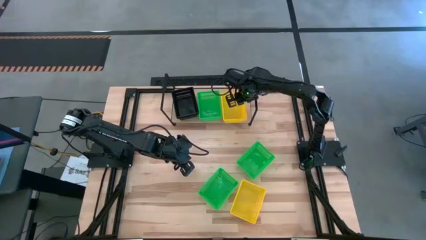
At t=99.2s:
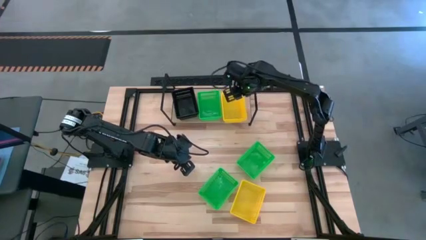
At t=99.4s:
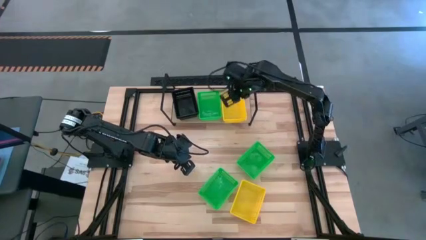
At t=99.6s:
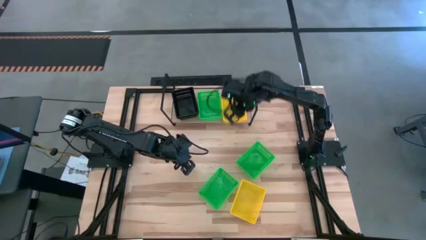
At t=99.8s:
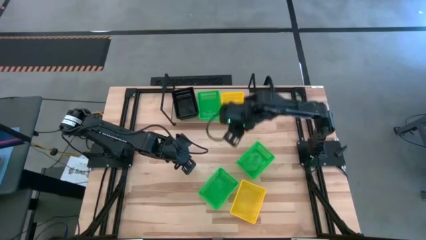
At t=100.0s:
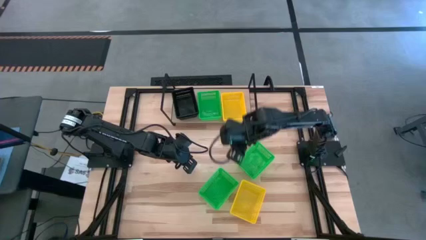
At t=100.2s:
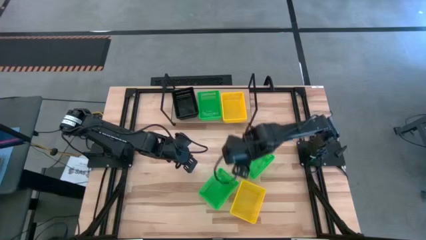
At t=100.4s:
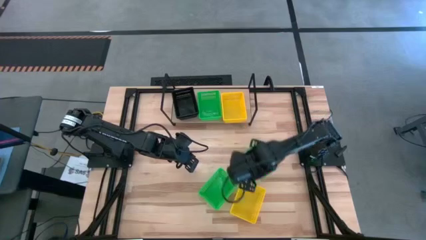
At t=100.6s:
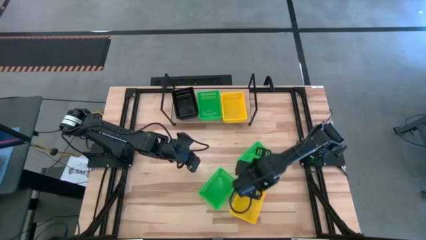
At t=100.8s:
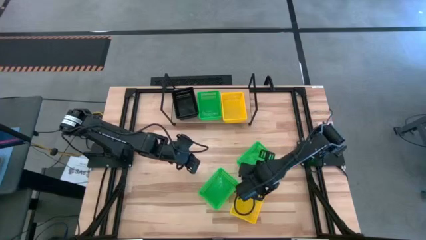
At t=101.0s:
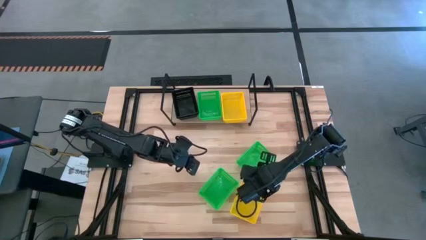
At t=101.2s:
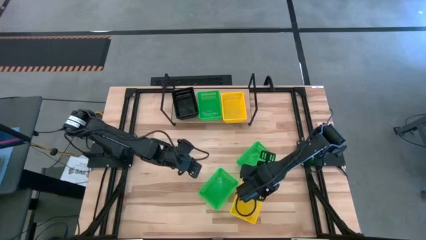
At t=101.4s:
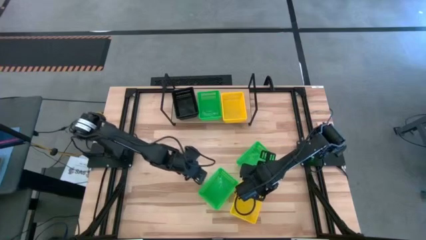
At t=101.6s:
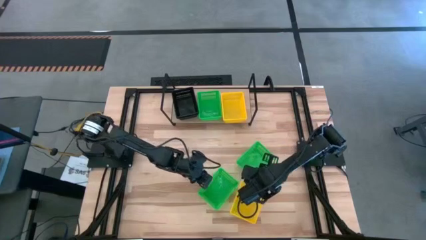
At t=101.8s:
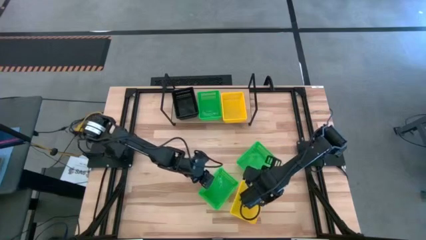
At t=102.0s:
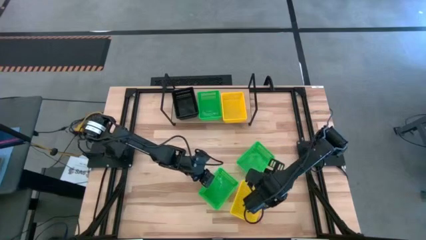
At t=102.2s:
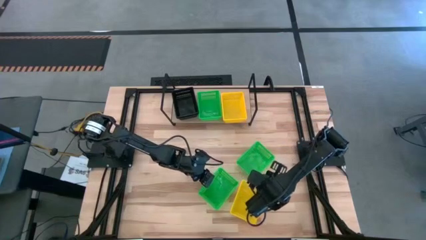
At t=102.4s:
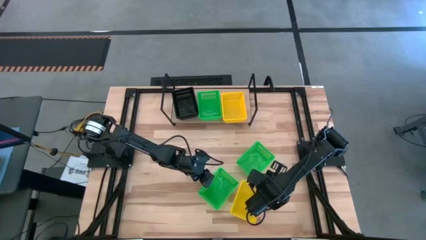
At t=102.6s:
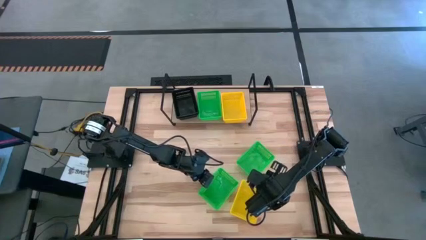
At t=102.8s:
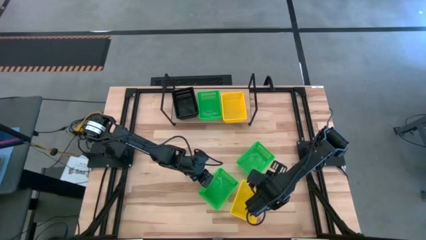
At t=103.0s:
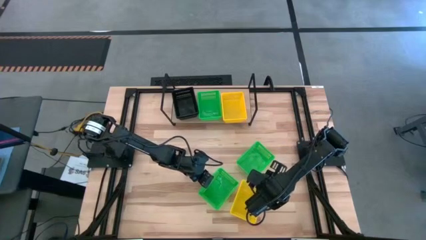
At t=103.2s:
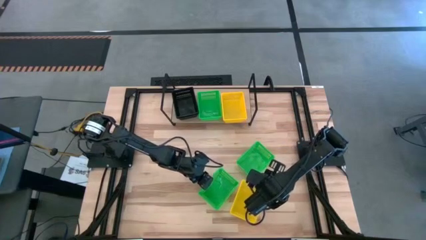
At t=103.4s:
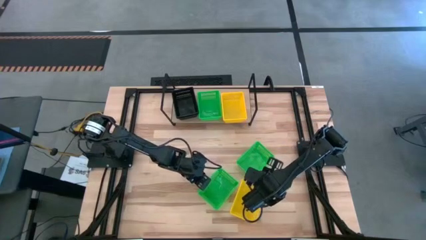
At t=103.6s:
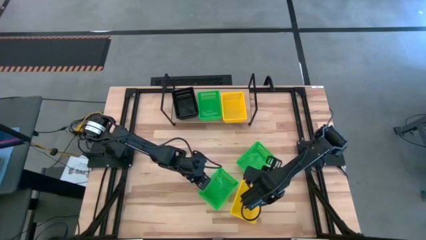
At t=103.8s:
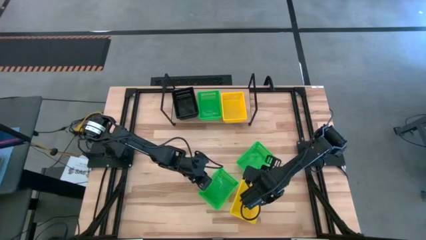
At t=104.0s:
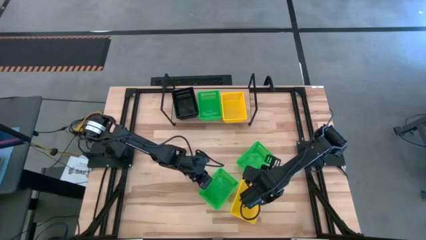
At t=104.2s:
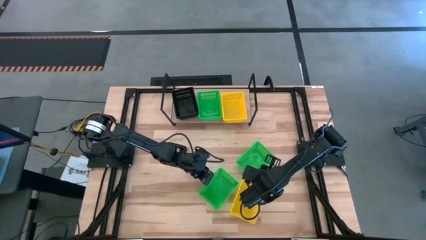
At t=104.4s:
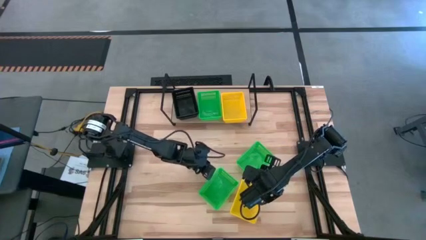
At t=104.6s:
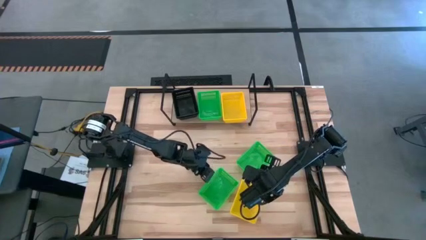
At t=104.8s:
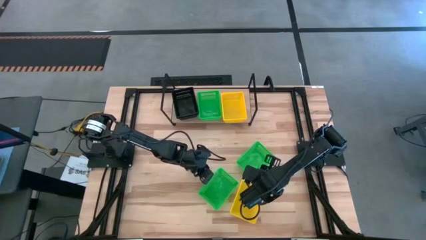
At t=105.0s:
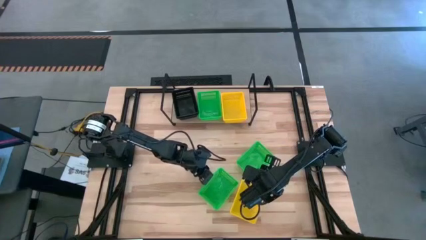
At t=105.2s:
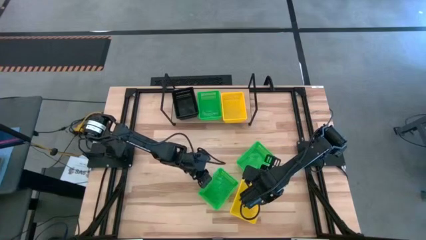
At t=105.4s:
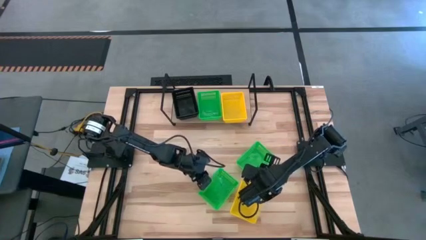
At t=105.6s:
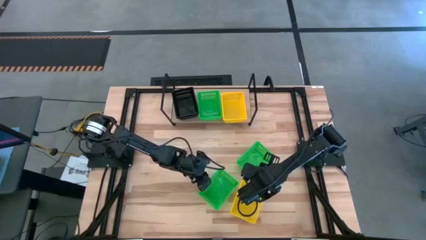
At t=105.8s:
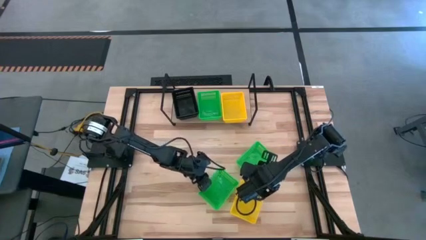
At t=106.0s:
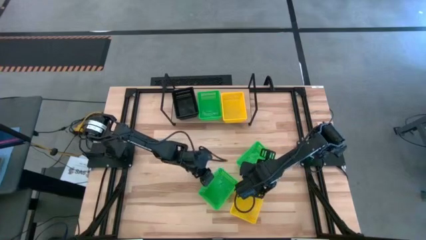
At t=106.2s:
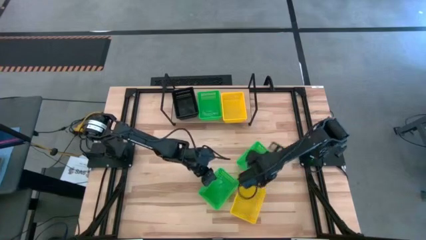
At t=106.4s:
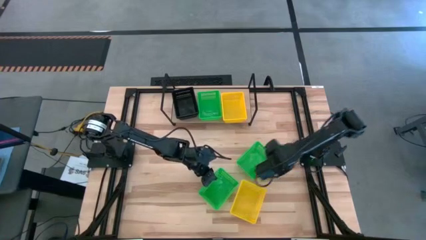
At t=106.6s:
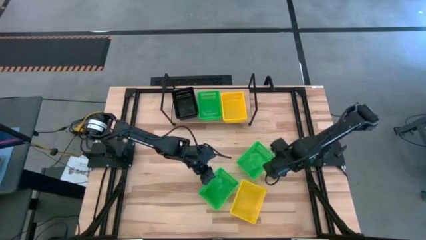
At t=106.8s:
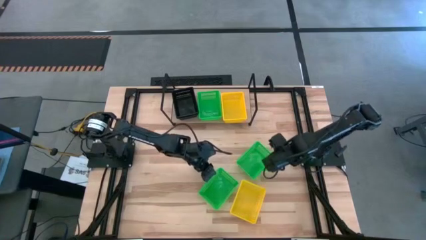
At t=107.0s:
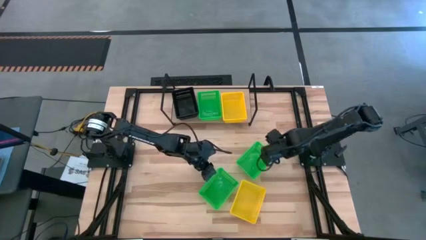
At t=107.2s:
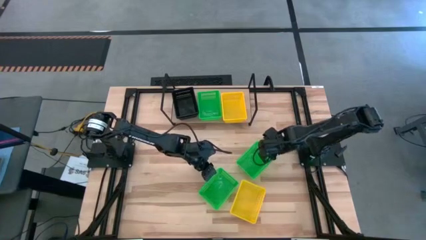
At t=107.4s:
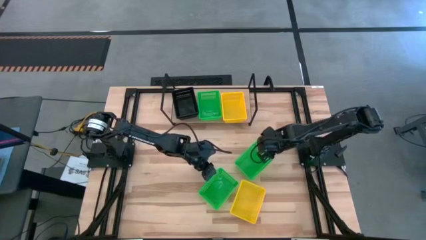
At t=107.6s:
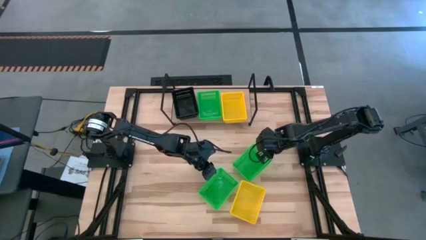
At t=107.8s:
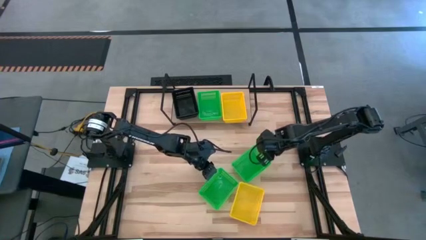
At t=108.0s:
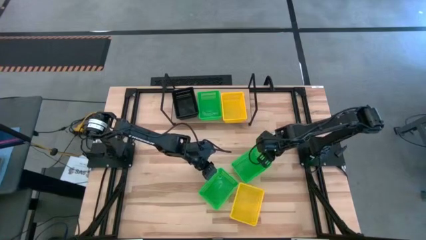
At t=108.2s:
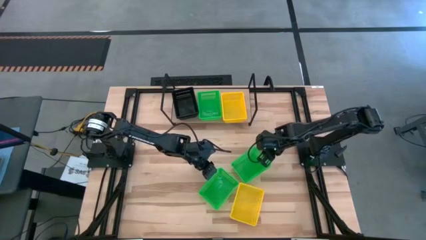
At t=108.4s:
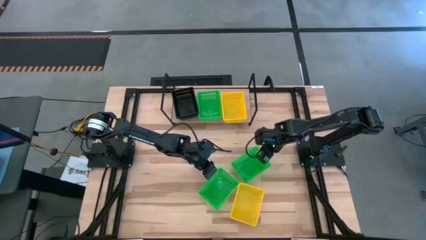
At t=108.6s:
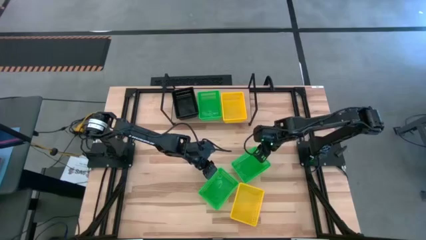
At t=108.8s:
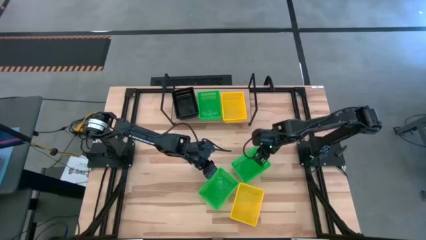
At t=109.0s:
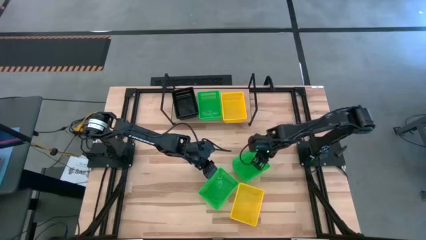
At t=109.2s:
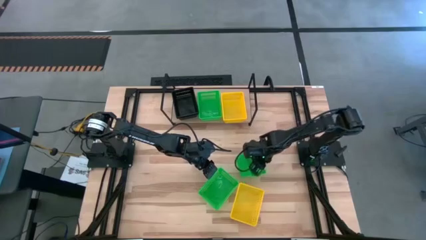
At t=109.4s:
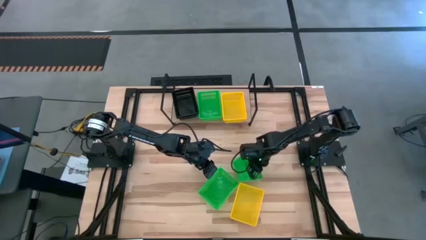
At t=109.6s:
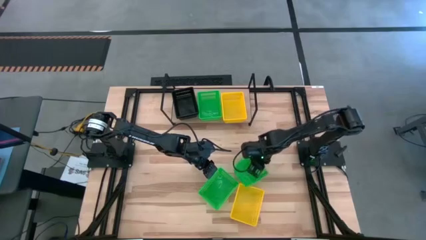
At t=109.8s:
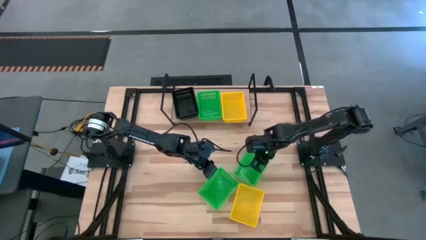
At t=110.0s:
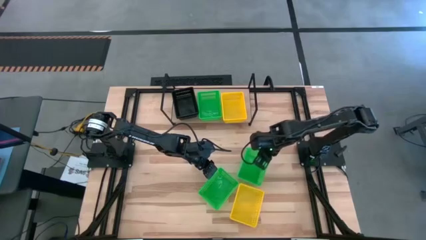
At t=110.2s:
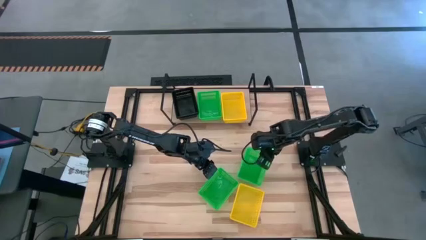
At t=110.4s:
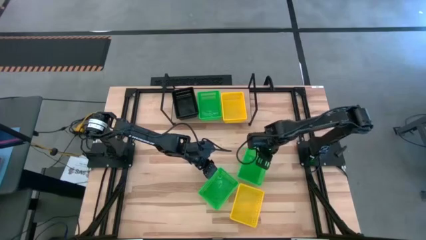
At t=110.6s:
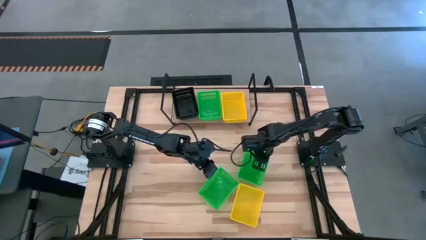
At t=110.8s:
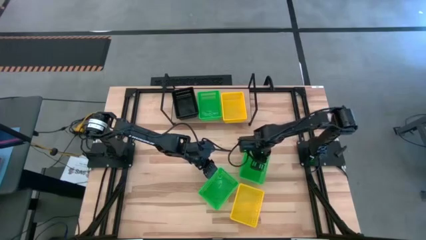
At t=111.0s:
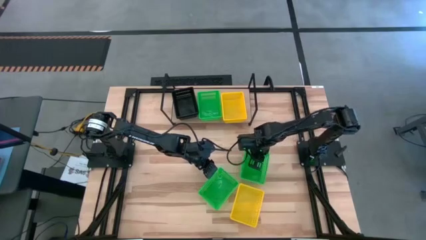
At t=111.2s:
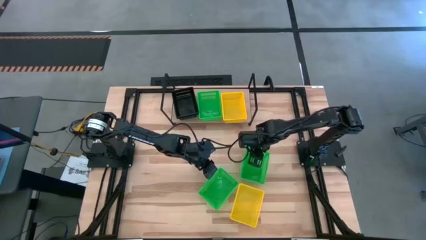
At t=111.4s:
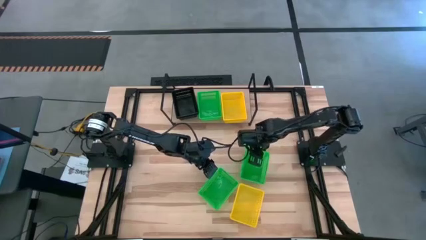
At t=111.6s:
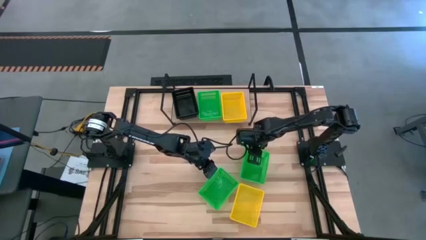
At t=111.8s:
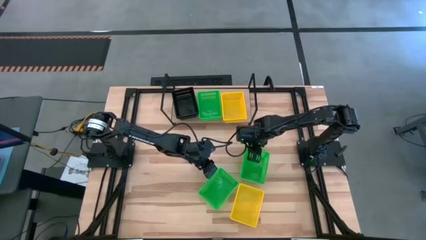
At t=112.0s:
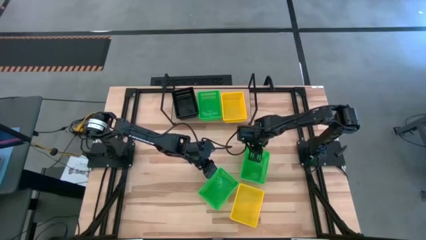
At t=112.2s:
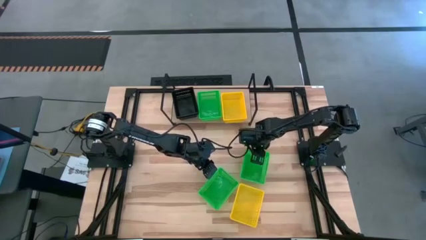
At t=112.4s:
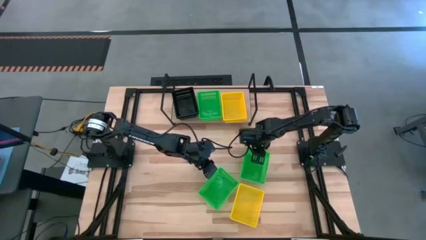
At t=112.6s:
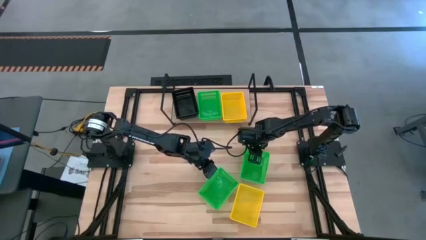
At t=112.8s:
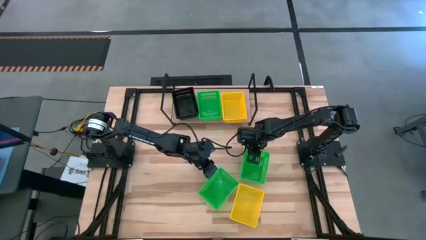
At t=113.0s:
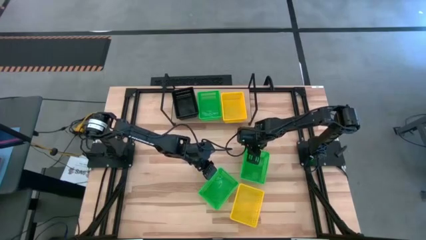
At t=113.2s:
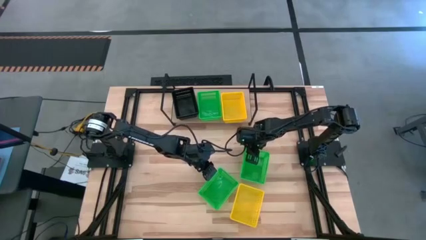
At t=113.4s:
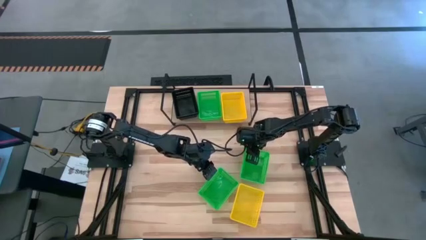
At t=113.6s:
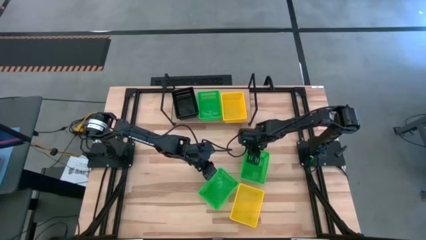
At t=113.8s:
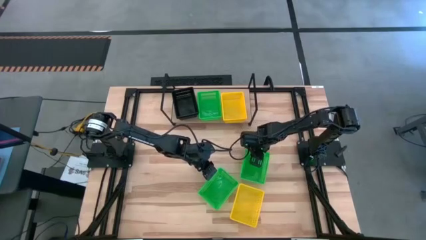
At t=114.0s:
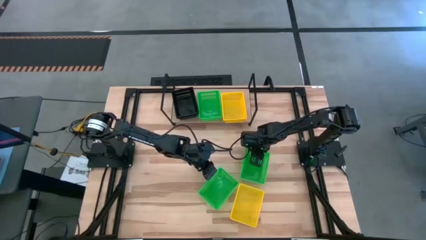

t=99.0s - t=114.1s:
Task: Stack baskets on shelf by color
Stack the top green bin on top of the green bin on the shelf
